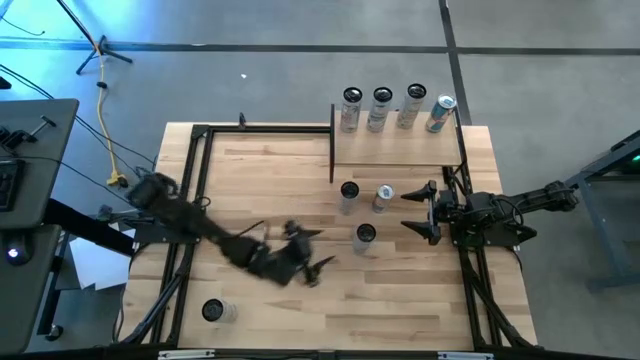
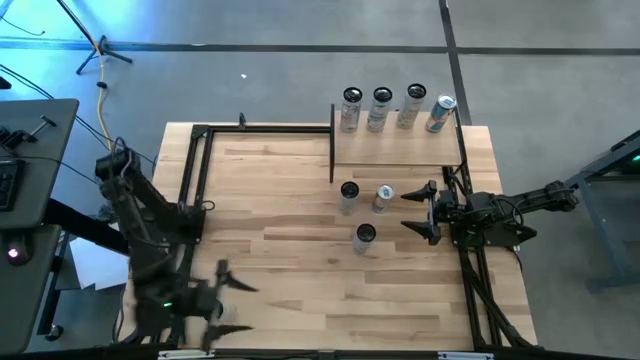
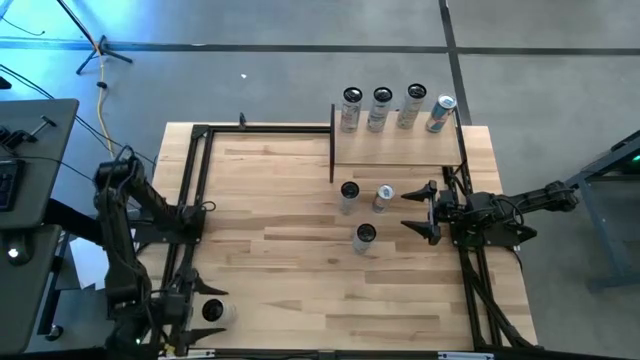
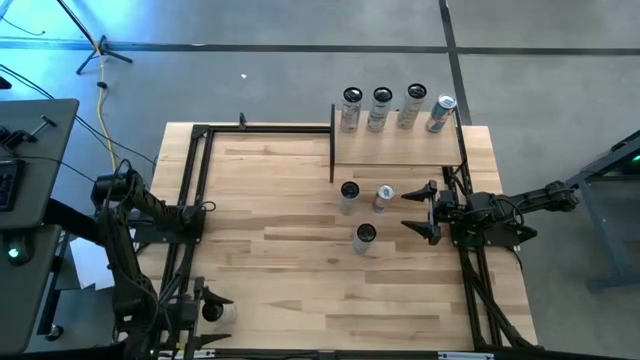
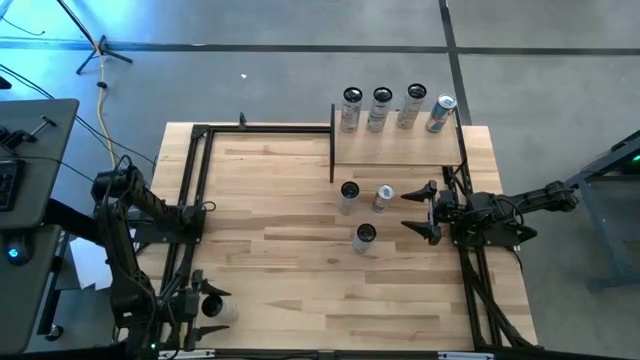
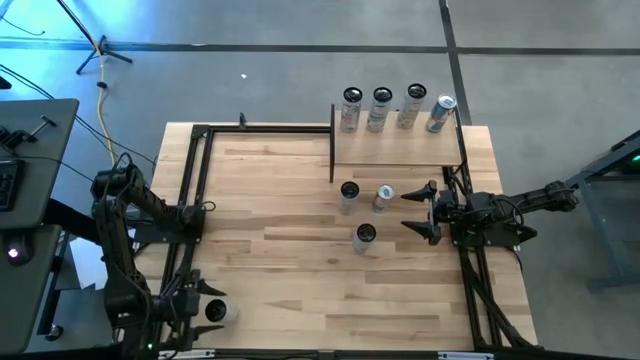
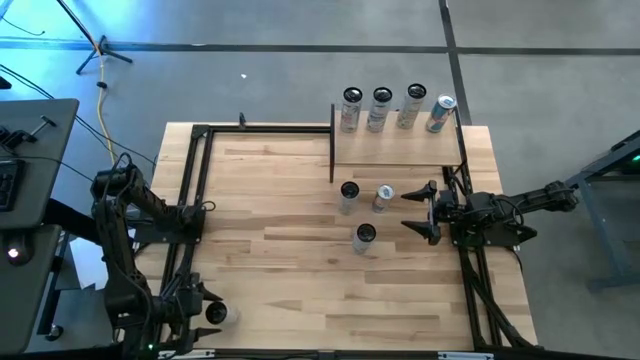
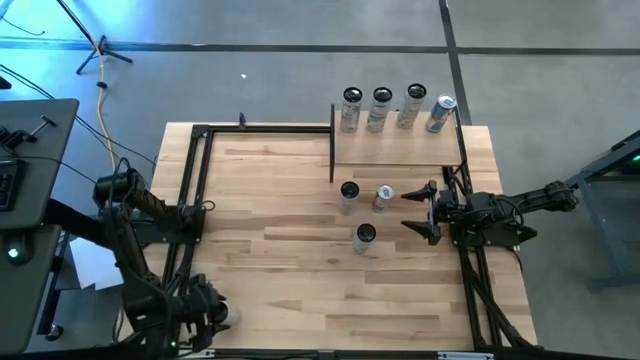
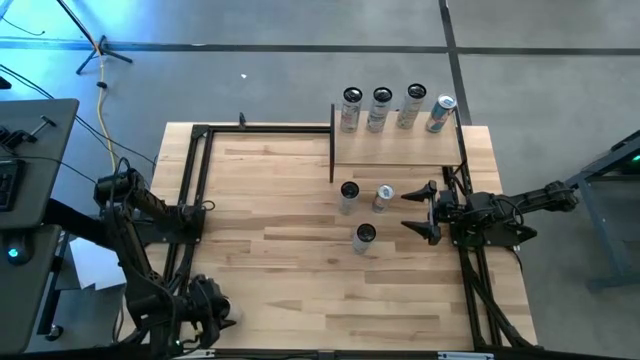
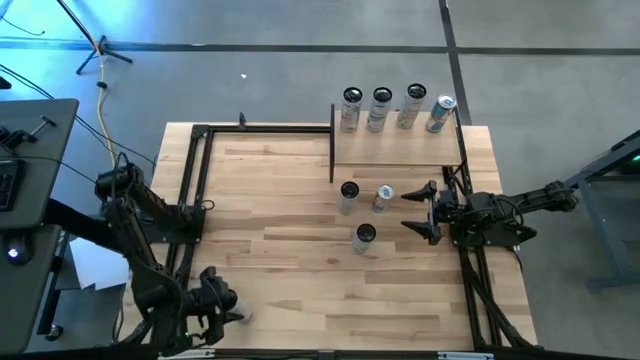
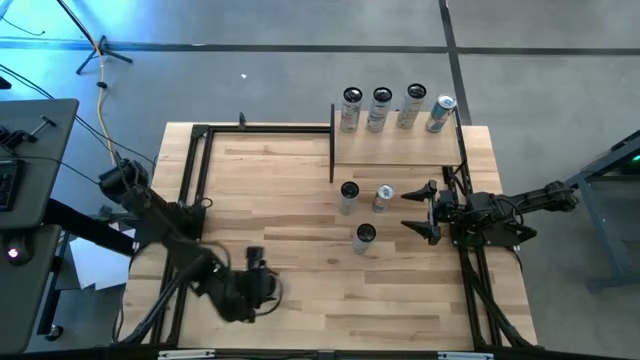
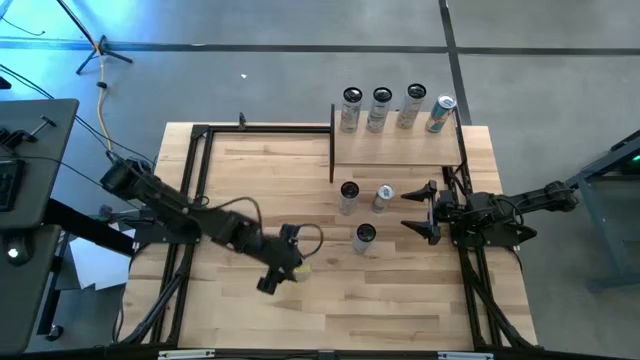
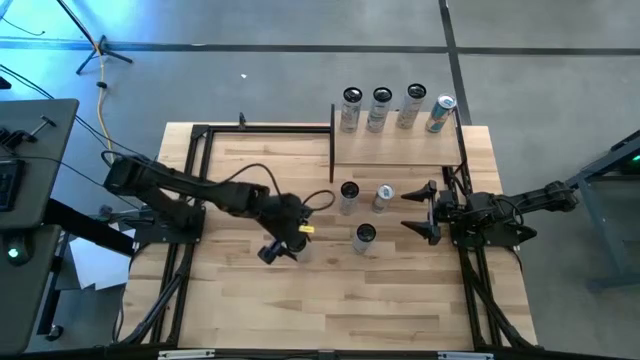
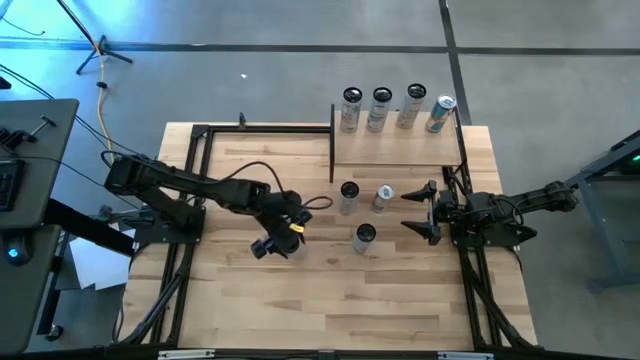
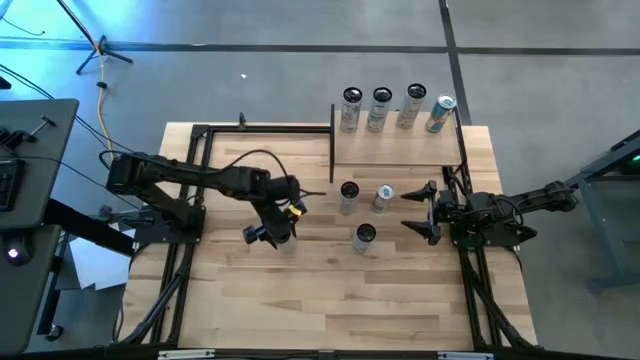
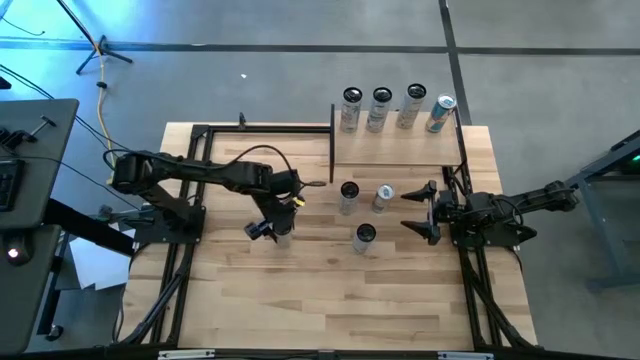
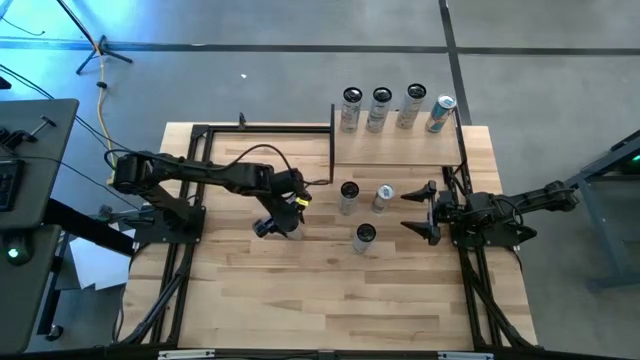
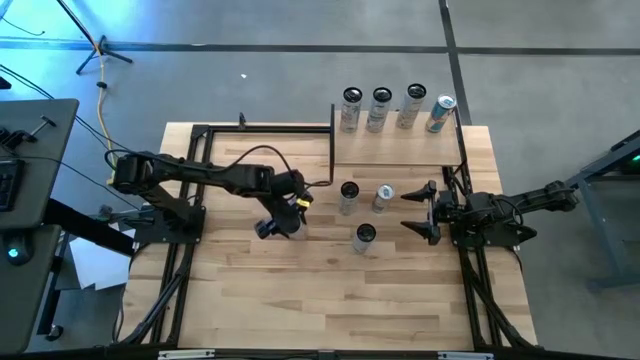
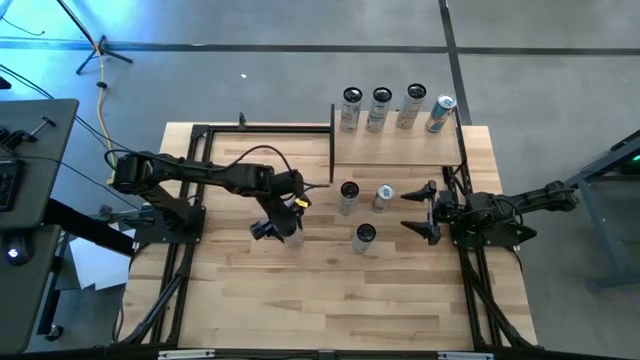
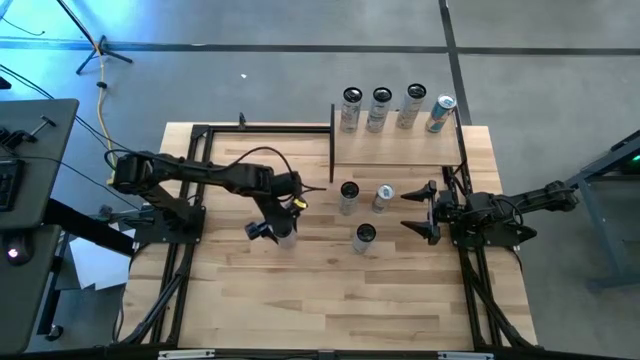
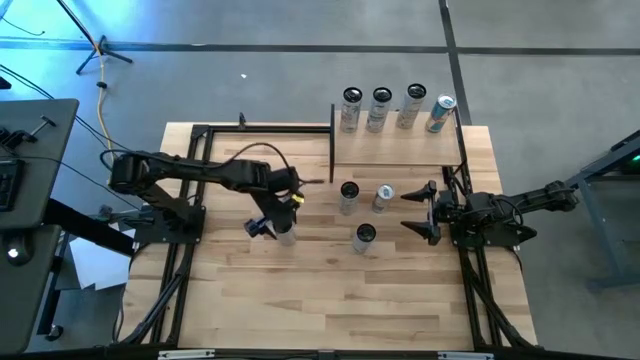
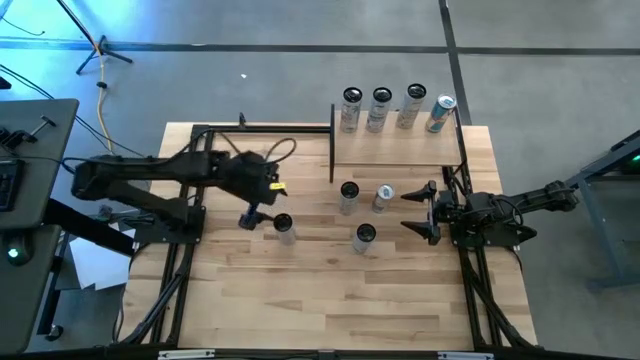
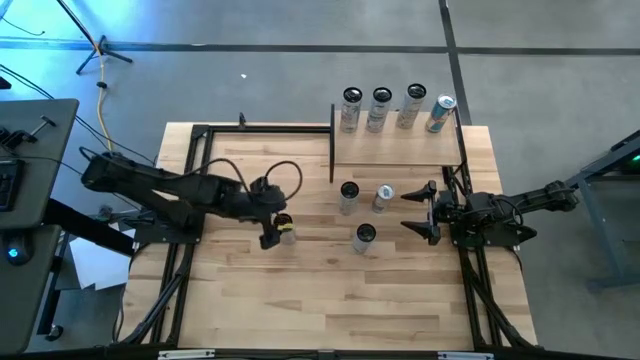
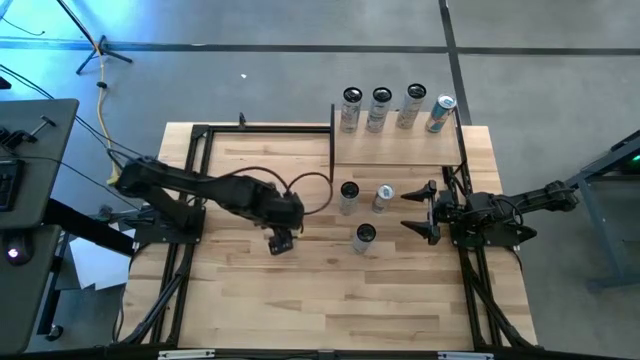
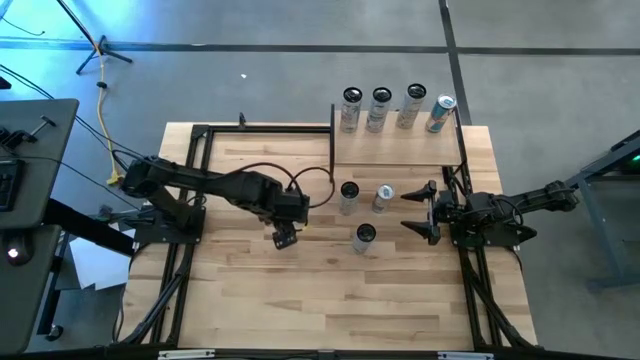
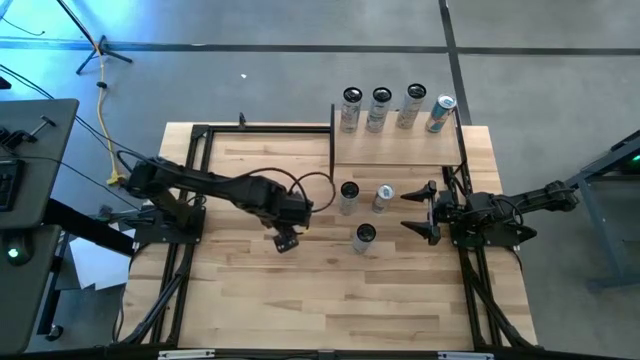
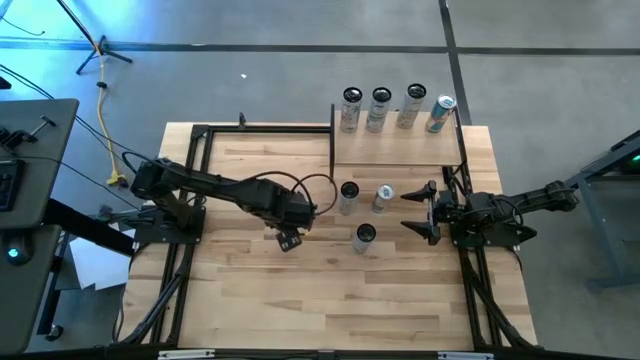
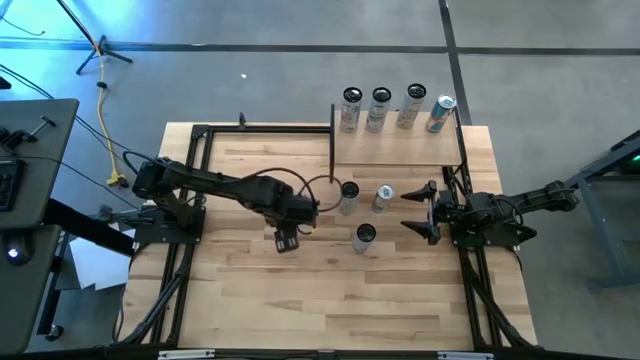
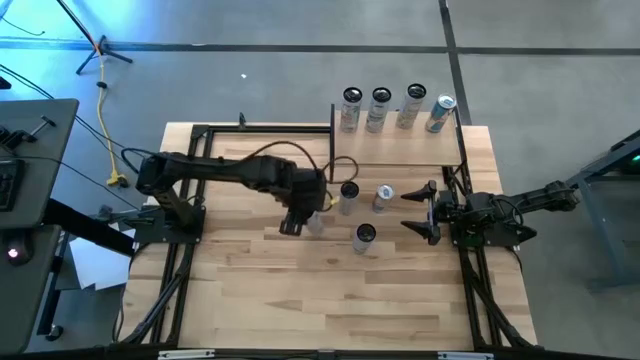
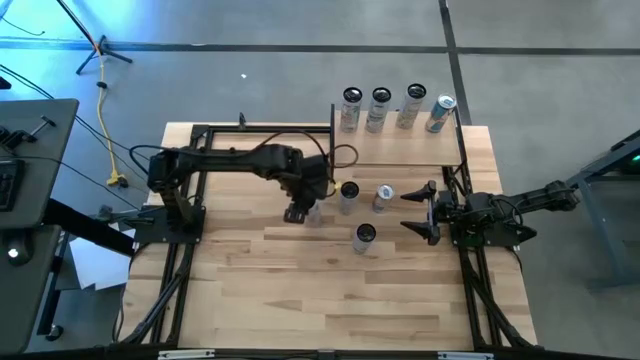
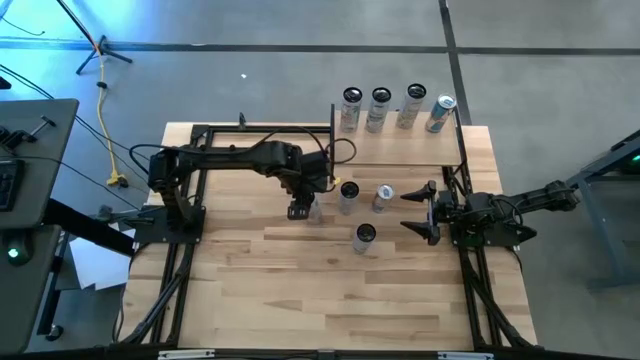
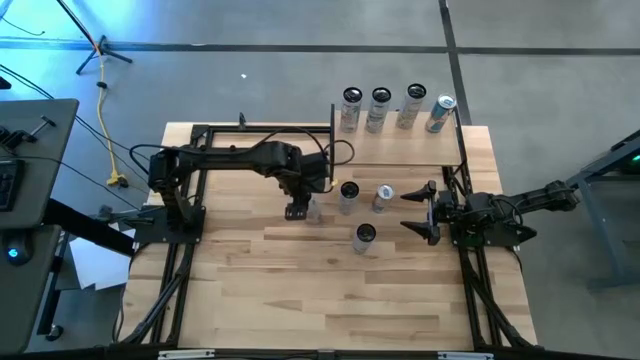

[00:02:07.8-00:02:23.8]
Task: Place canned beverage on shelf
Move the white pink soda can to the center of the table

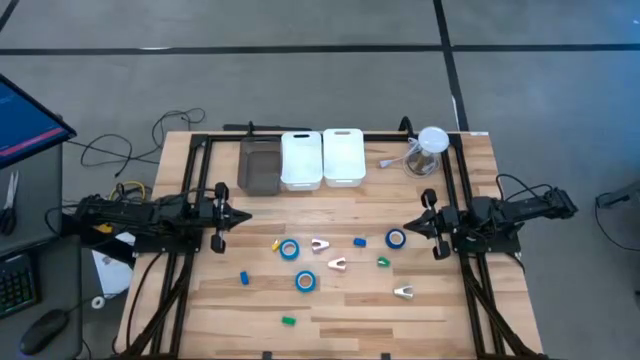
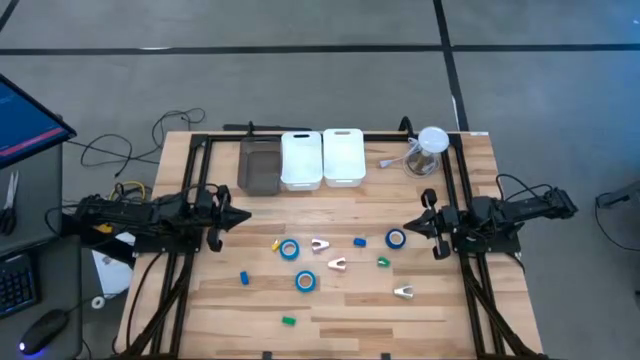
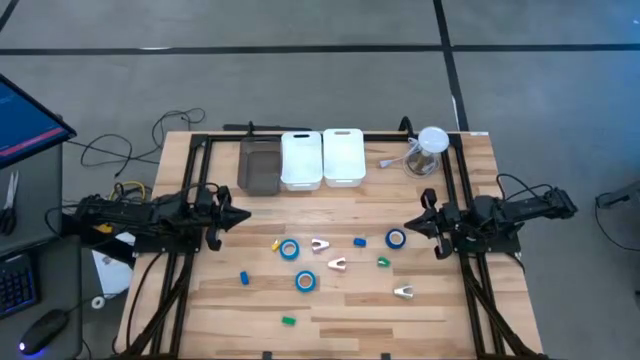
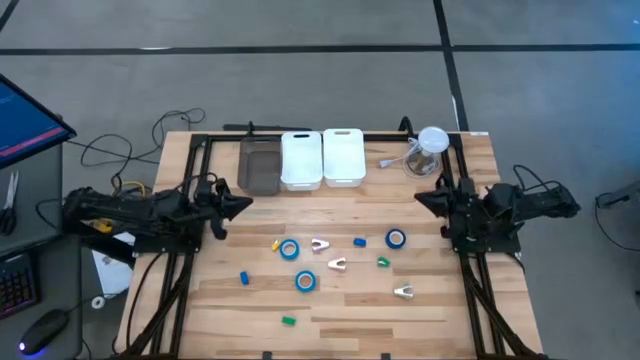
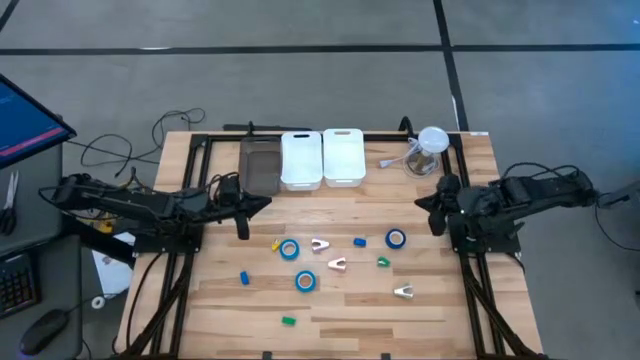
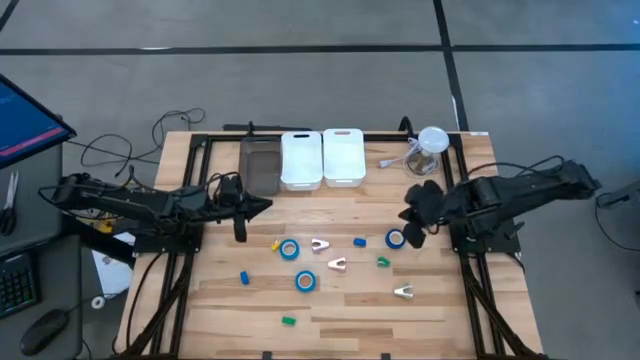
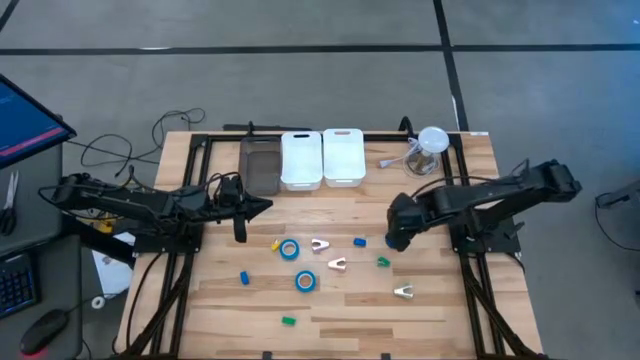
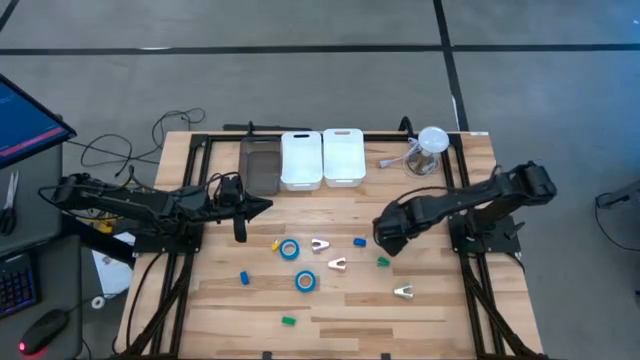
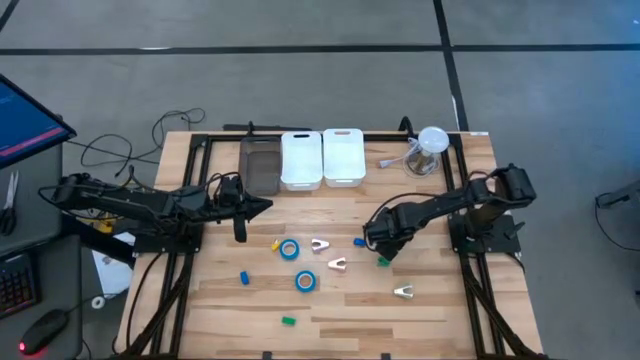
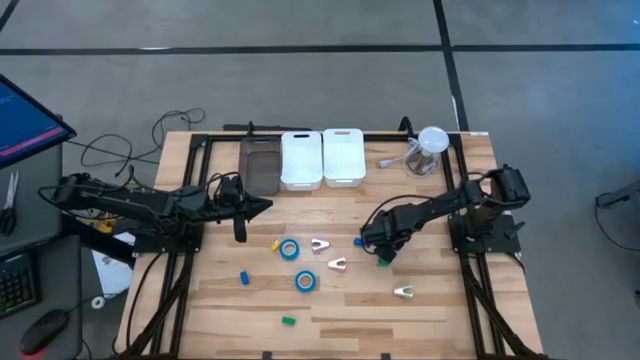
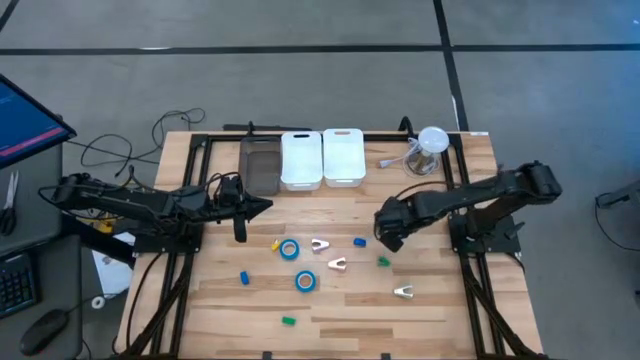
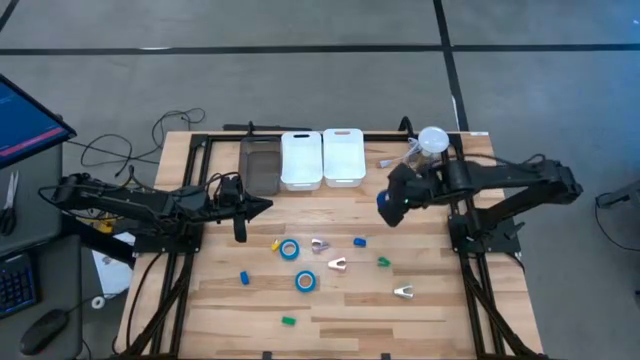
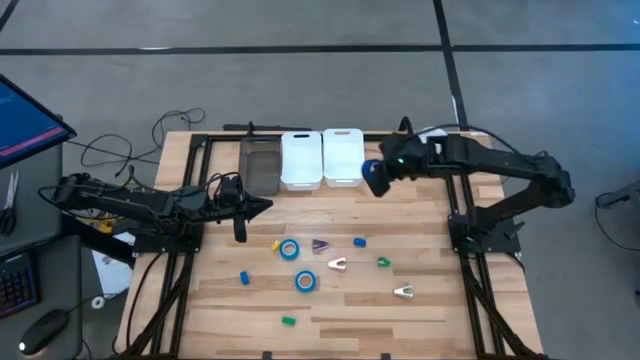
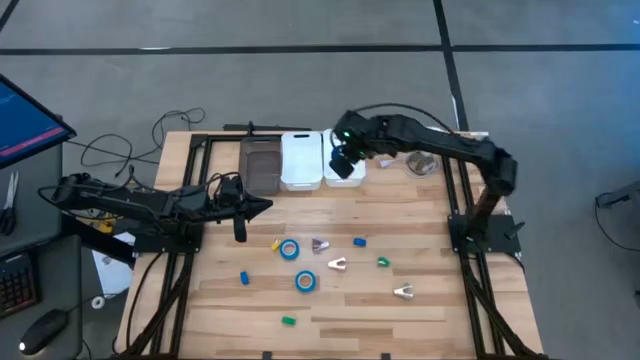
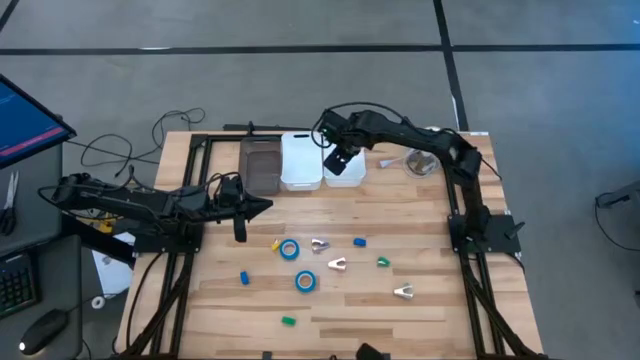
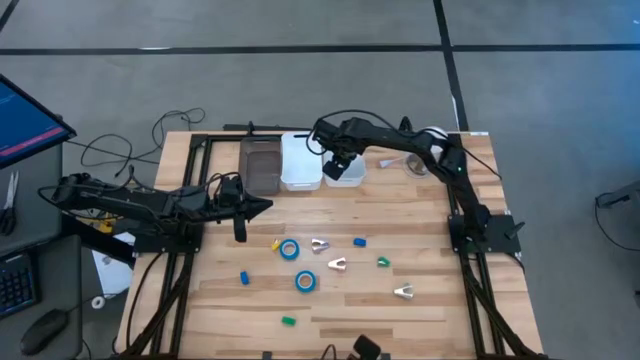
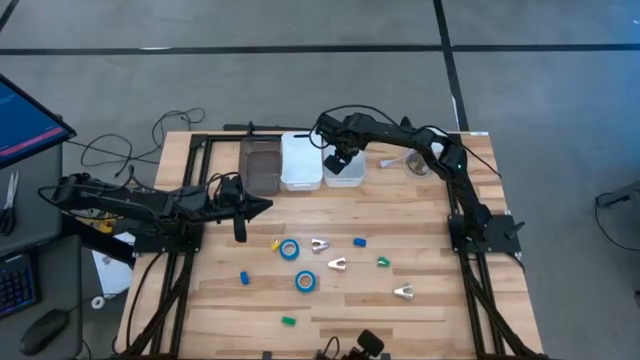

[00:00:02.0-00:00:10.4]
Task: Pick and place Stapler, Stapler remover, tape
Put the dark blue tape into the right white bin
